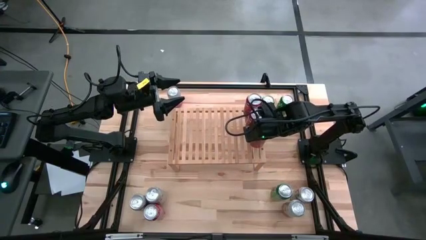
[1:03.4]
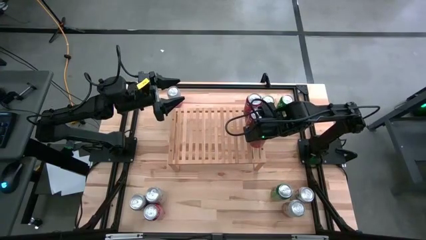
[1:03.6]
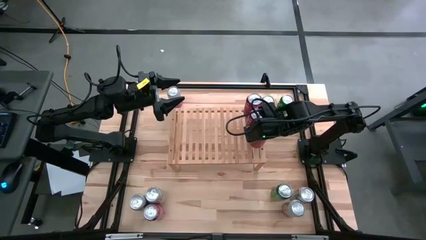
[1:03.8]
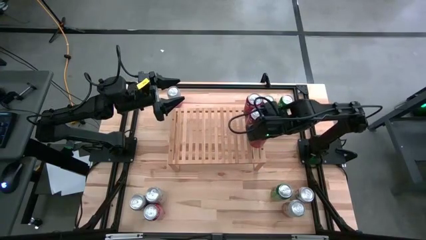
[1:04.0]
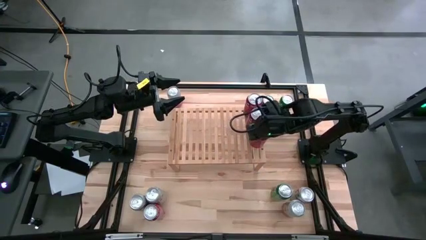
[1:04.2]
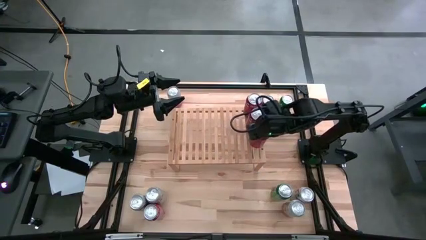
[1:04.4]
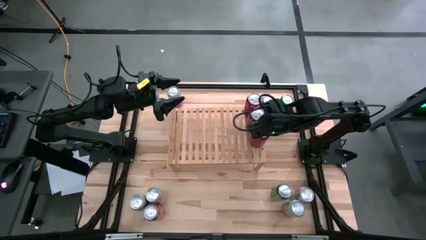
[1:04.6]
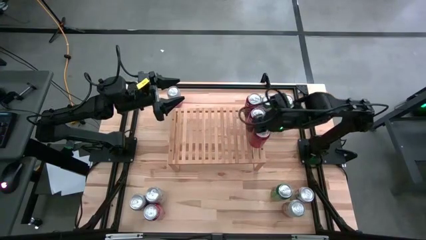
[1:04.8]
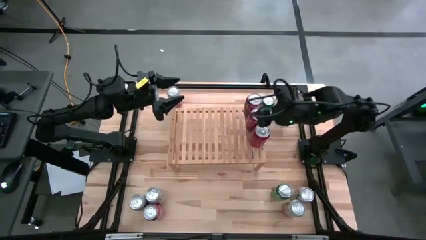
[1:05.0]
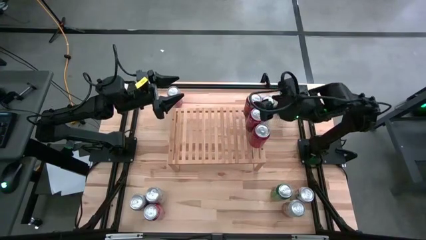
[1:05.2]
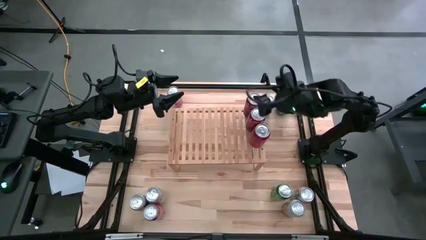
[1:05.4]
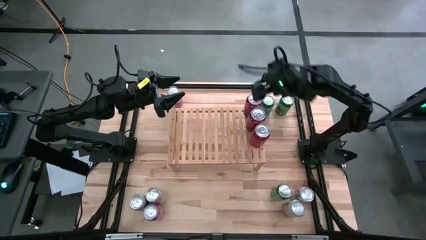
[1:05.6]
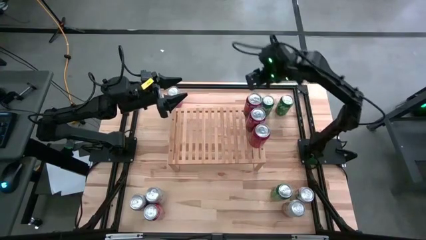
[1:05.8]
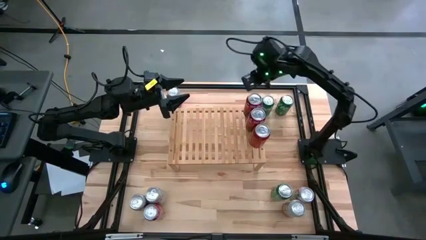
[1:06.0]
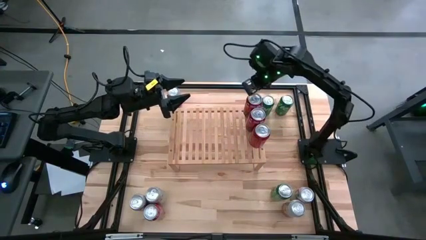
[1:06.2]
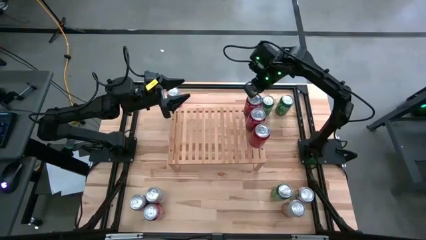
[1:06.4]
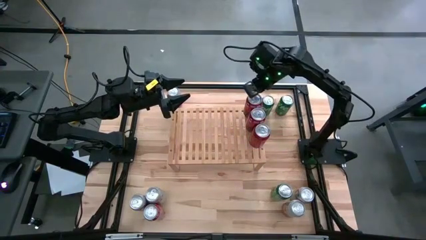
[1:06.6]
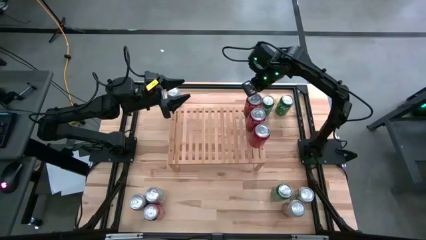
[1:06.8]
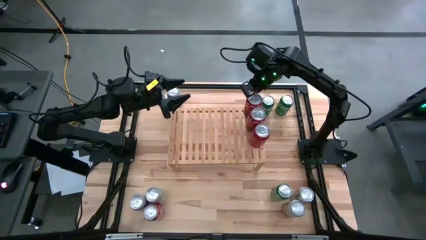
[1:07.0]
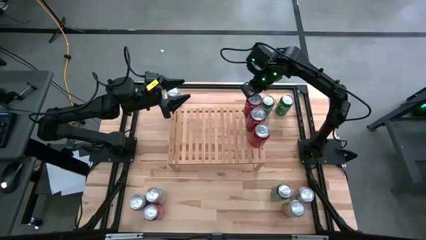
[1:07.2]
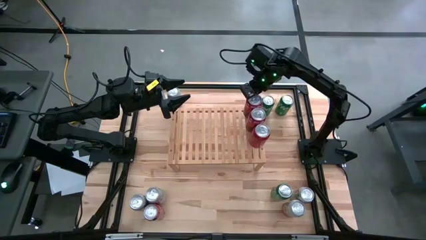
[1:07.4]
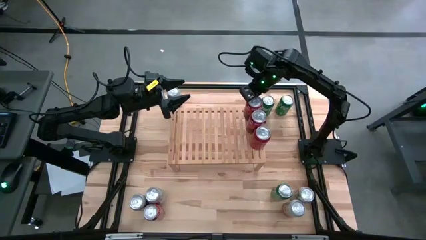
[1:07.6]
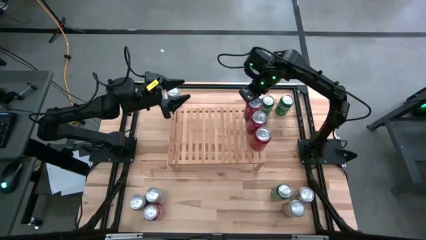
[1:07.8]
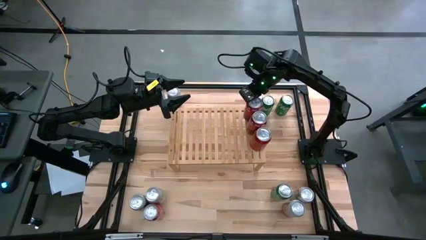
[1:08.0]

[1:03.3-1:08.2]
Task: Place canned beverage on shelf
Adjust the red soda cans on the shelf

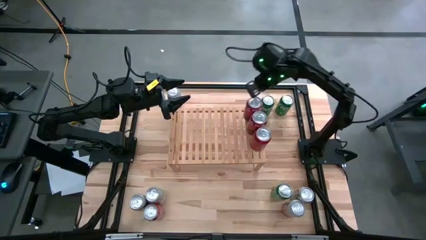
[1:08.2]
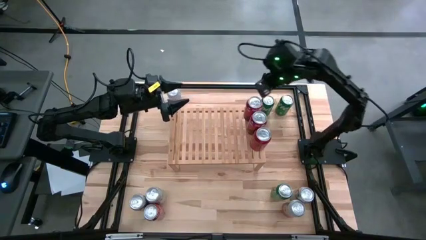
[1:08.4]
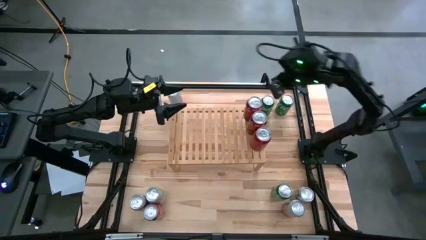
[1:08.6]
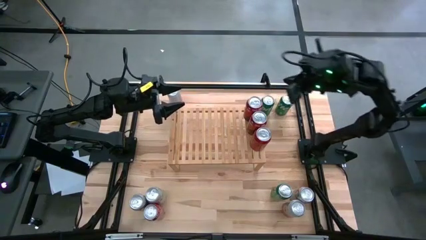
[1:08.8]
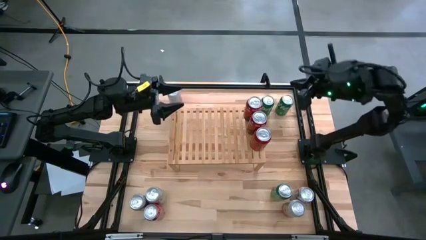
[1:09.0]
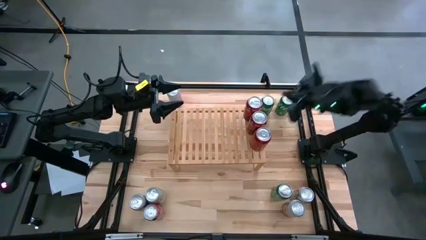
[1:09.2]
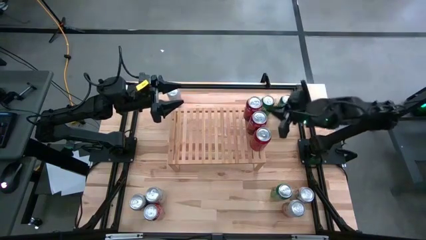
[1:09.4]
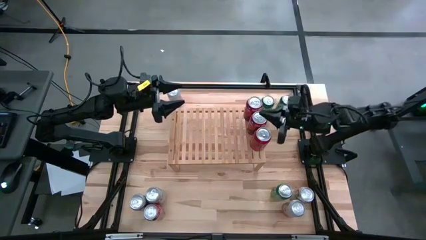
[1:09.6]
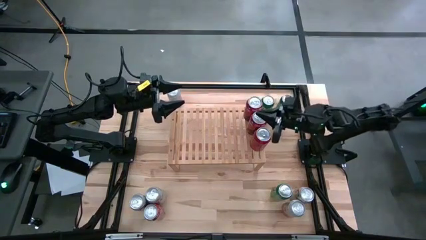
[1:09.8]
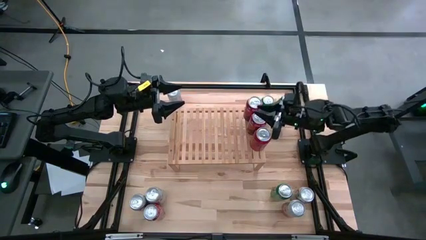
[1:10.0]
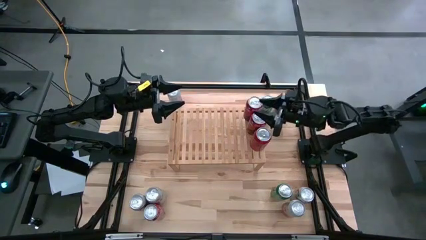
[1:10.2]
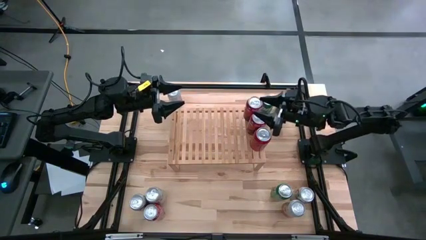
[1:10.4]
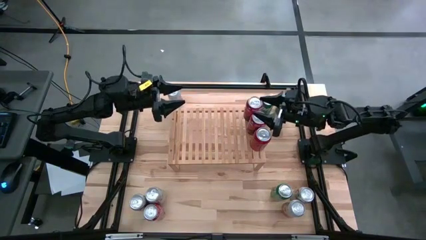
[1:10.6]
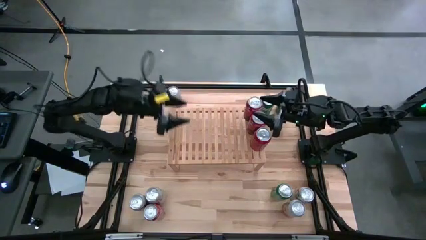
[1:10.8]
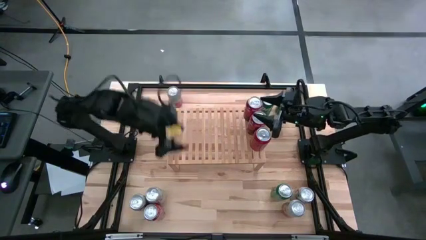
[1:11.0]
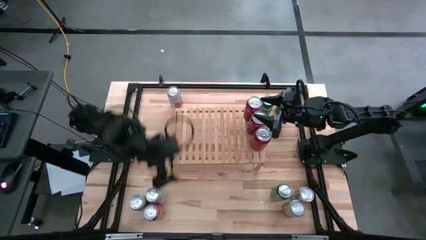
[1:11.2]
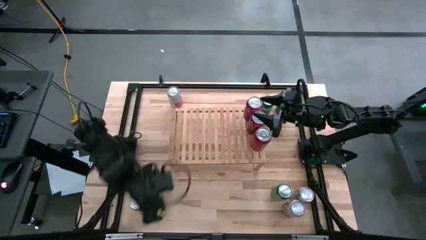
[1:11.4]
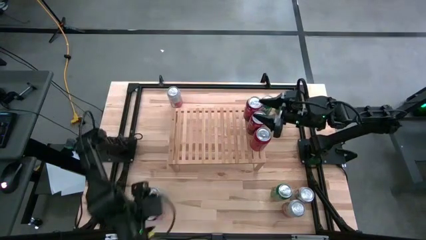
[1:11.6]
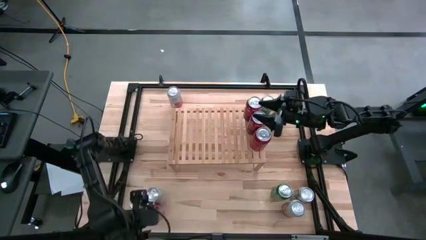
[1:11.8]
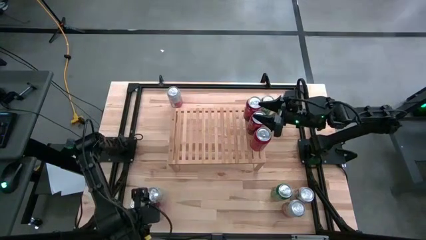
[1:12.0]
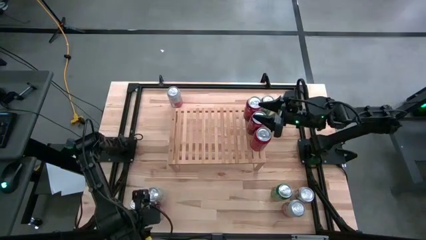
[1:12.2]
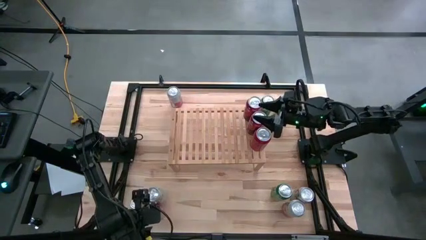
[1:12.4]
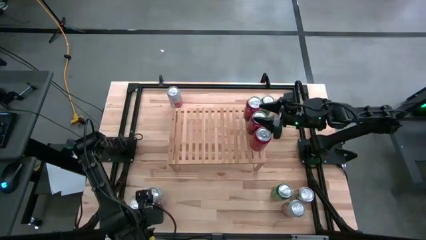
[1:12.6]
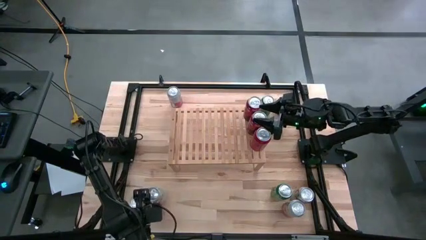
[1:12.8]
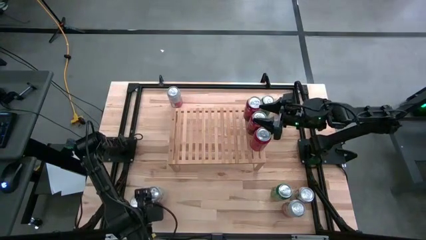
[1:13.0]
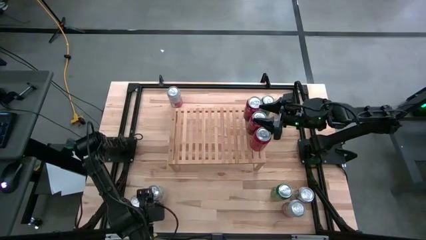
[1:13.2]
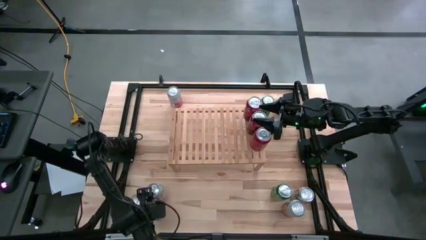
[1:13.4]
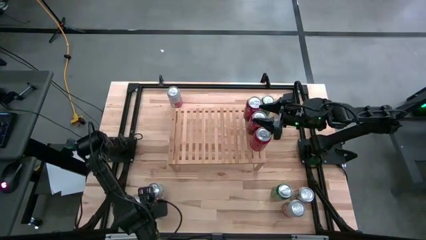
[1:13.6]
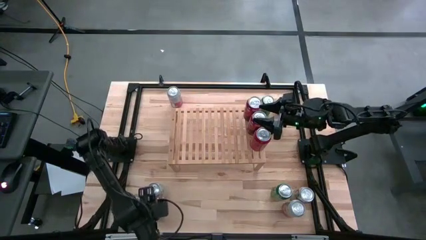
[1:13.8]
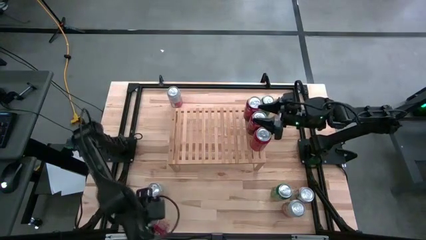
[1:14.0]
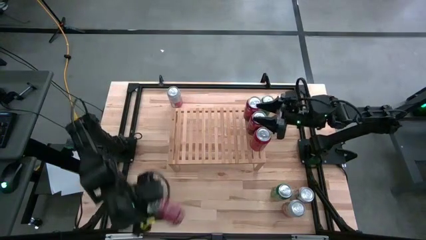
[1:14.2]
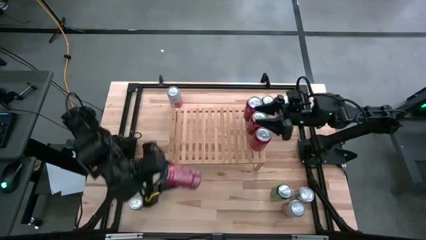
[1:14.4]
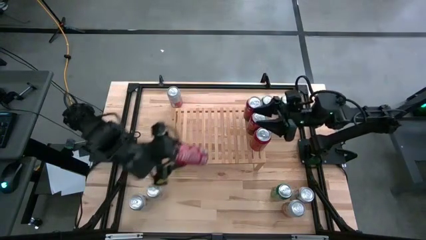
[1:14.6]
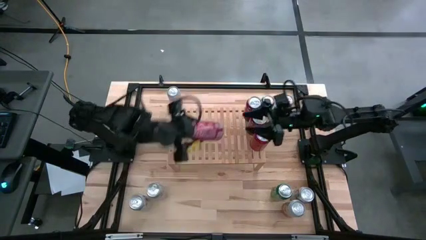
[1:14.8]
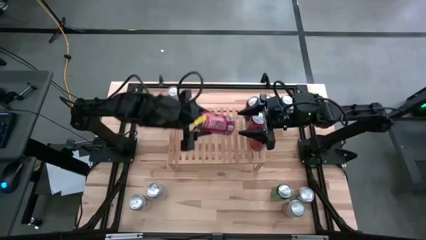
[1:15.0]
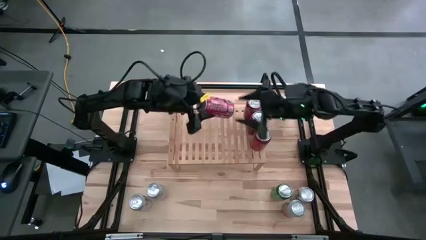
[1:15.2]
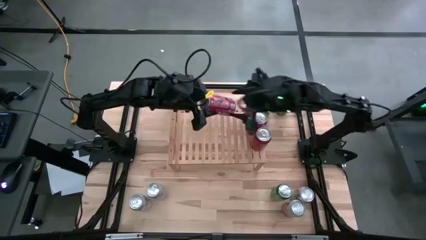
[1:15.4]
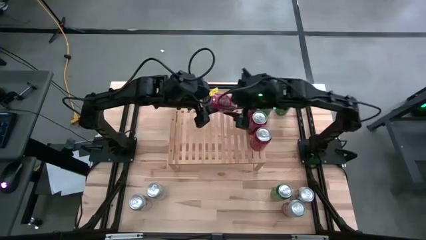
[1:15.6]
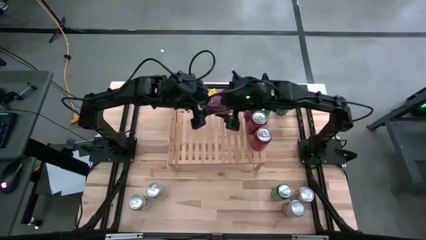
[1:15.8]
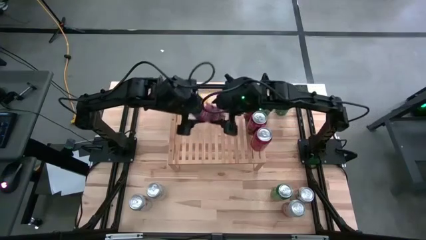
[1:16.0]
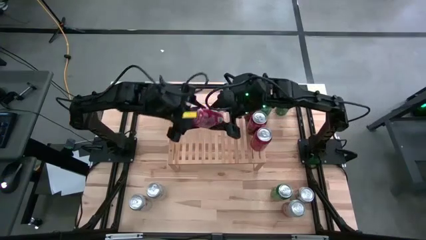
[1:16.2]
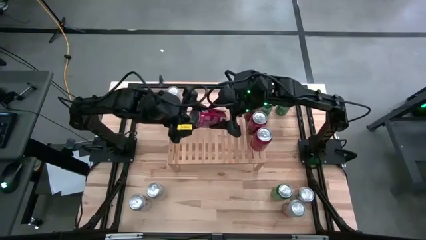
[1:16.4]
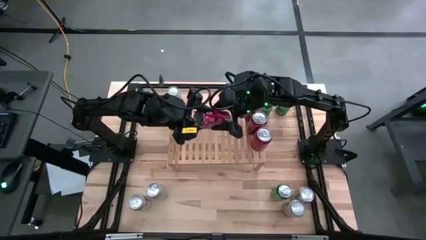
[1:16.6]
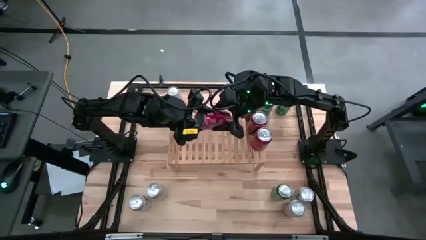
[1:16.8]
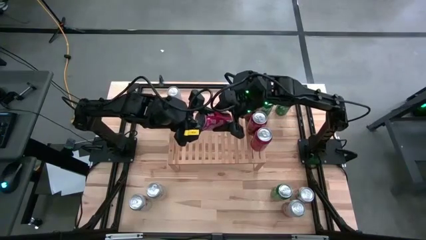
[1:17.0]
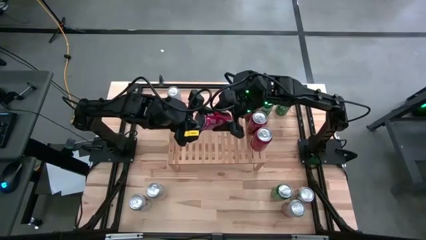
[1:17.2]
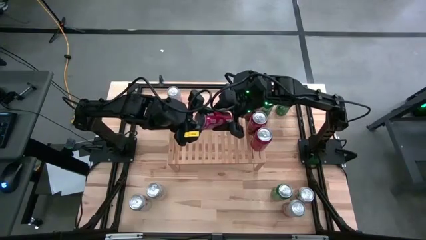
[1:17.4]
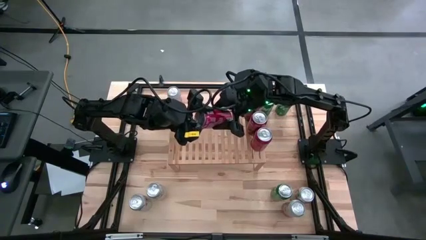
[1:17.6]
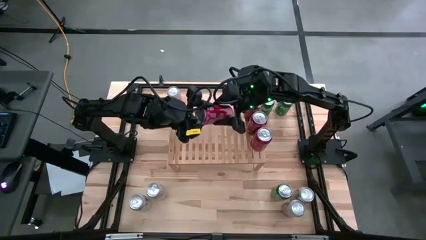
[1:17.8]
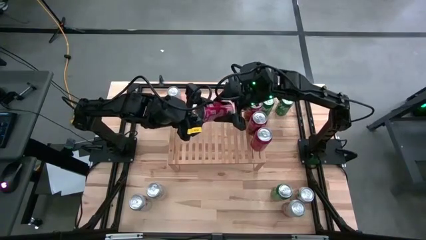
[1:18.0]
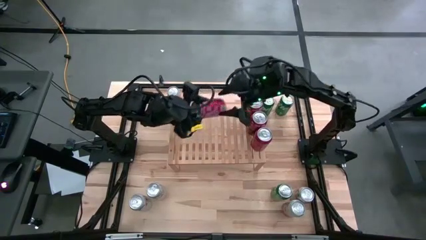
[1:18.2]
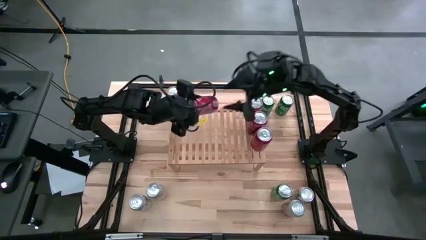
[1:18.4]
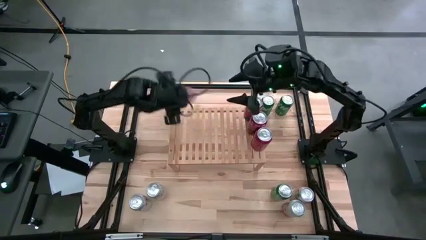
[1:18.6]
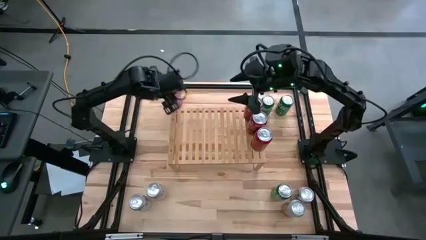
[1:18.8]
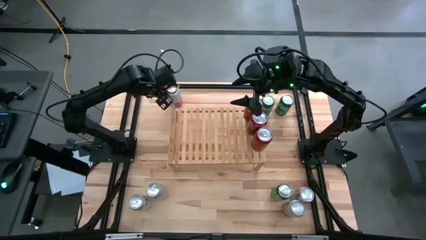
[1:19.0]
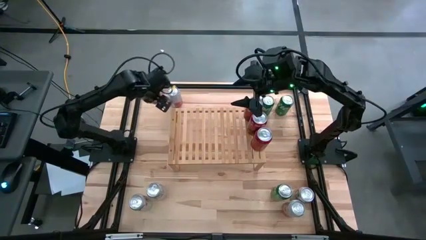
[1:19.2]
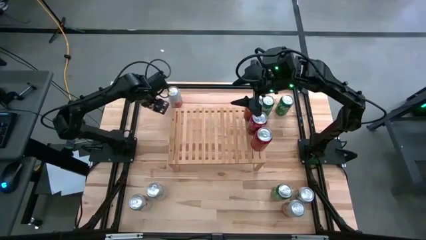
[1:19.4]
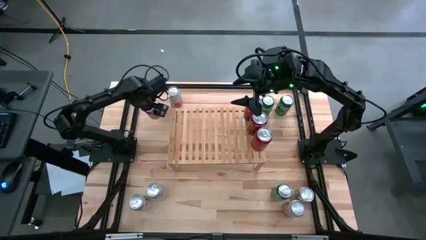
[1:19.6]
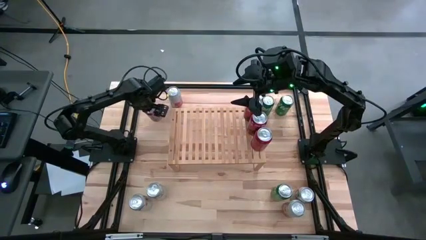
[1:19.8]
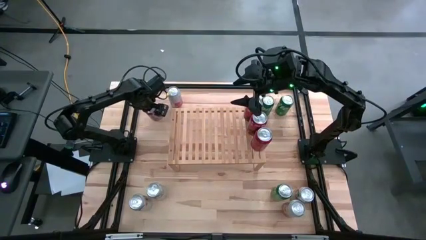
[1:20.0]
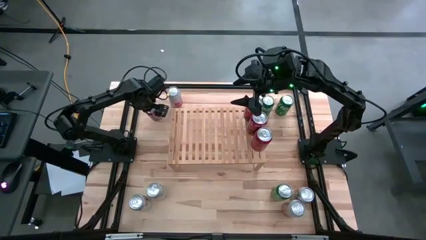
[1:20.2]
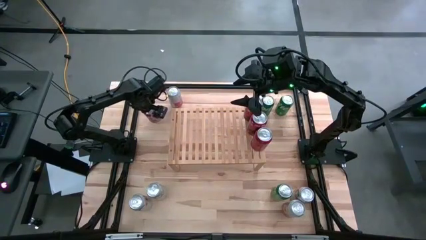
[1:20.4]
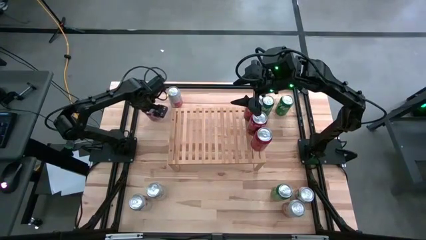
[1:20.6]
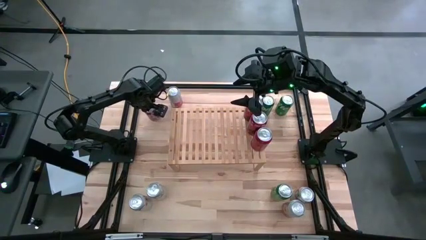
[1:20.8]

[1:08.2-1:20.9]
Move the bottom left red soda can to the top left of the table
